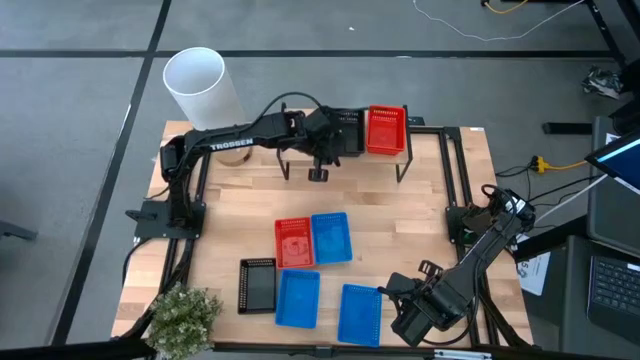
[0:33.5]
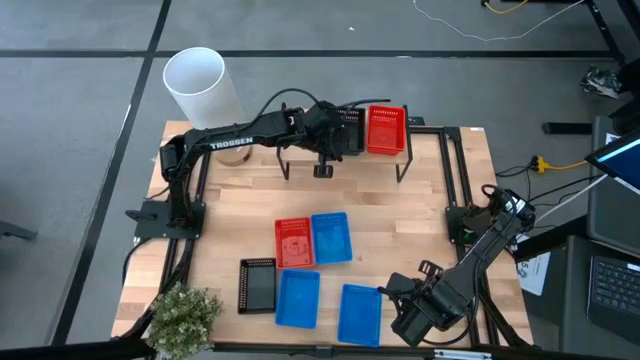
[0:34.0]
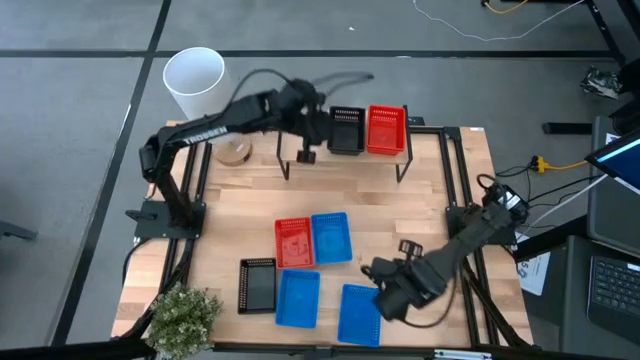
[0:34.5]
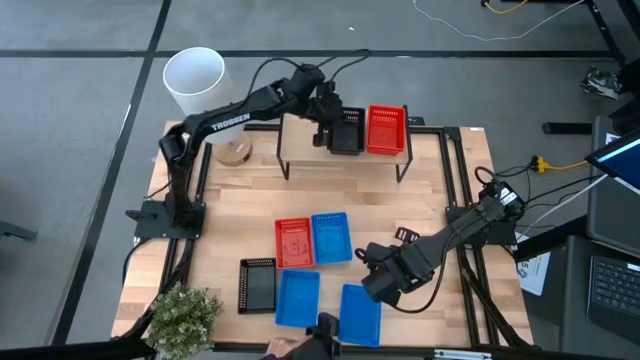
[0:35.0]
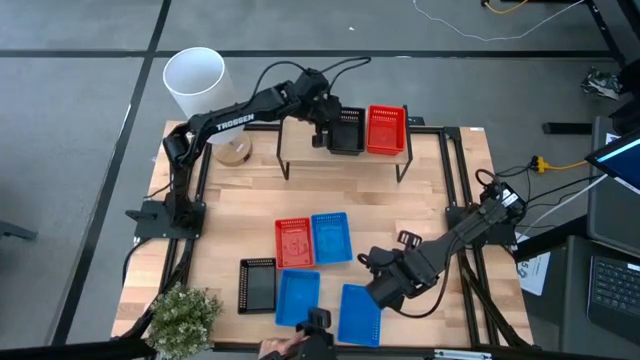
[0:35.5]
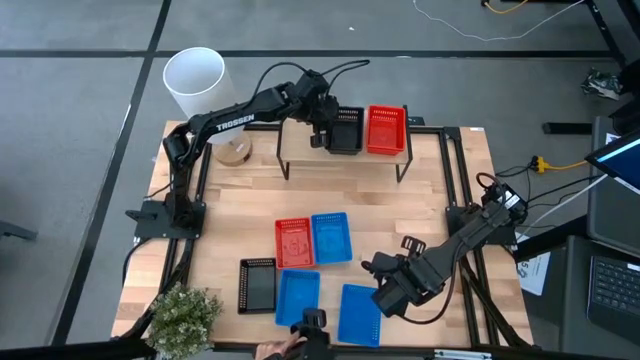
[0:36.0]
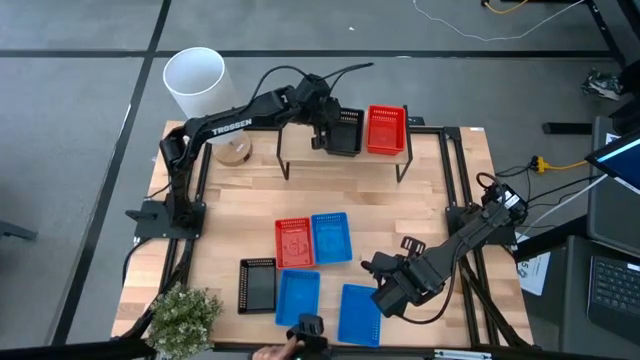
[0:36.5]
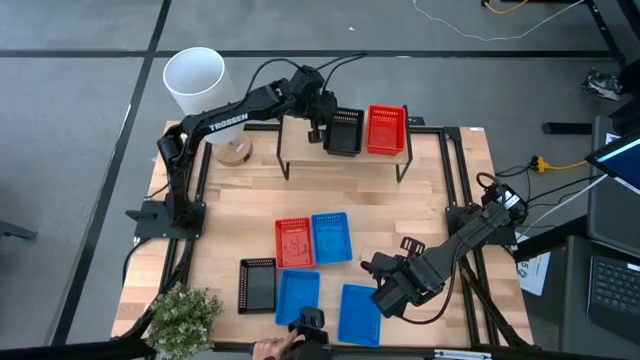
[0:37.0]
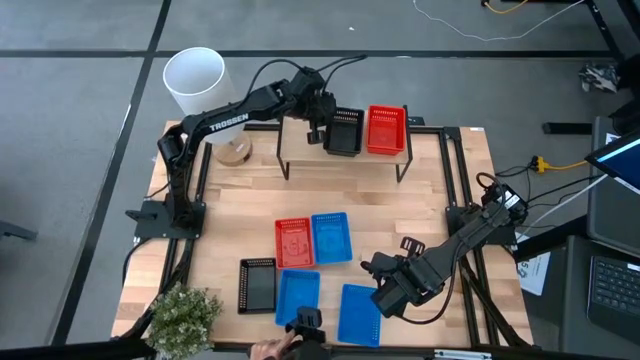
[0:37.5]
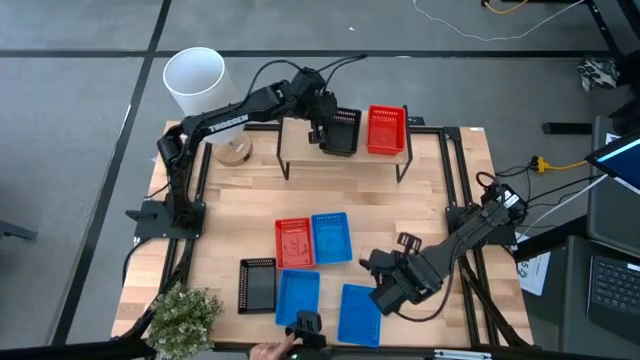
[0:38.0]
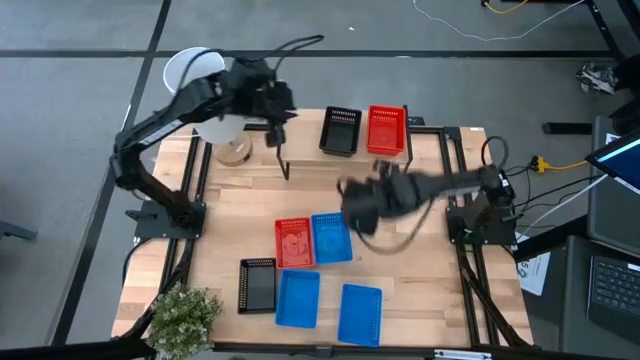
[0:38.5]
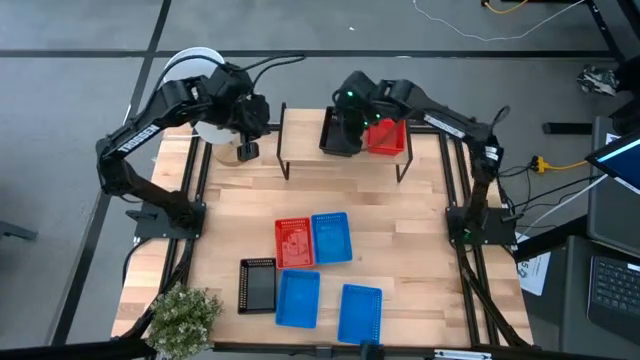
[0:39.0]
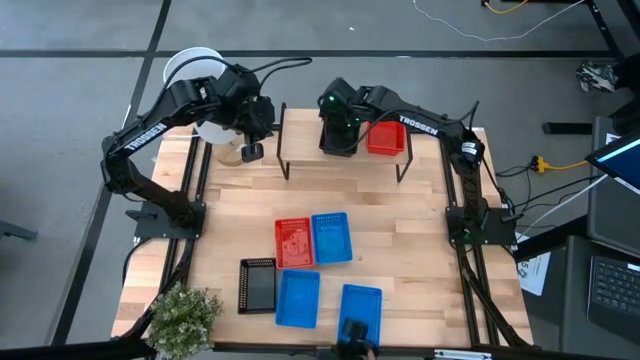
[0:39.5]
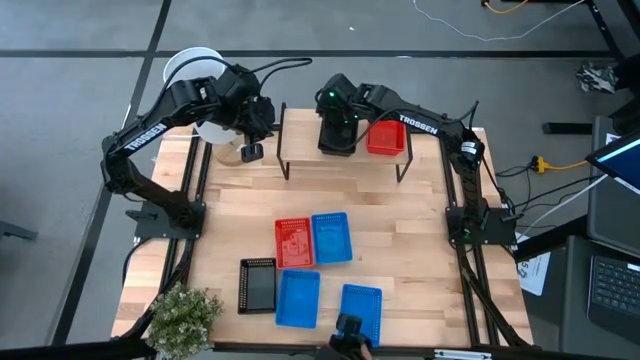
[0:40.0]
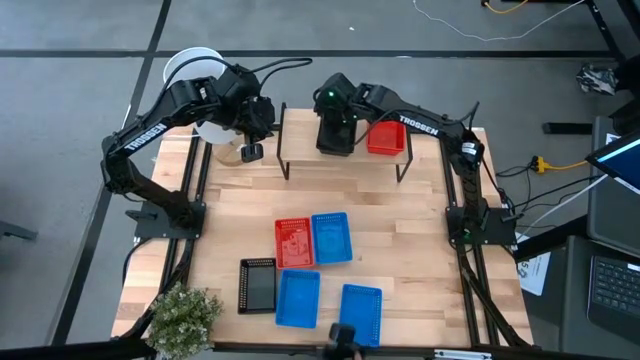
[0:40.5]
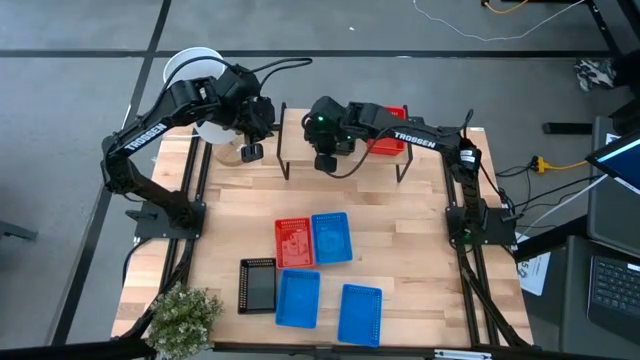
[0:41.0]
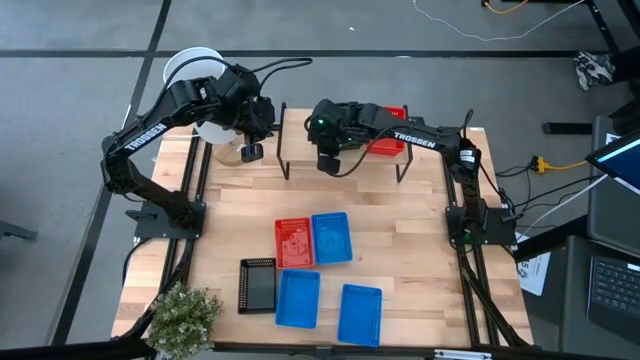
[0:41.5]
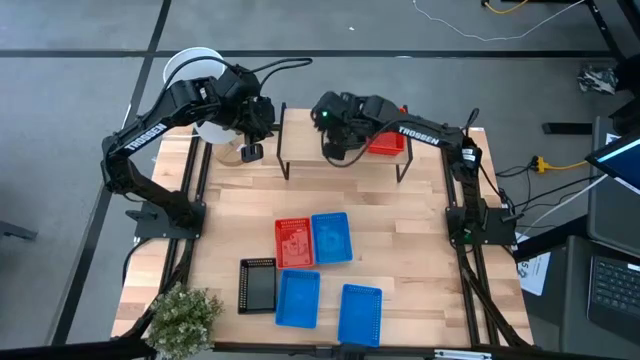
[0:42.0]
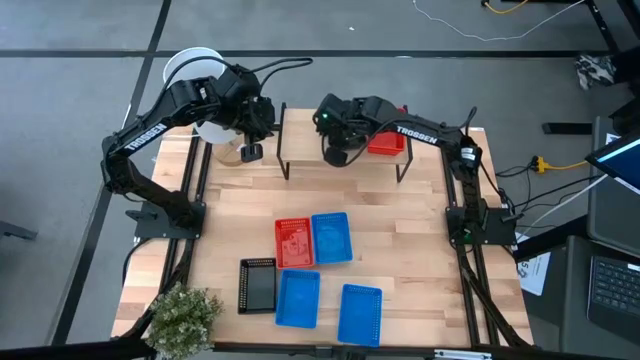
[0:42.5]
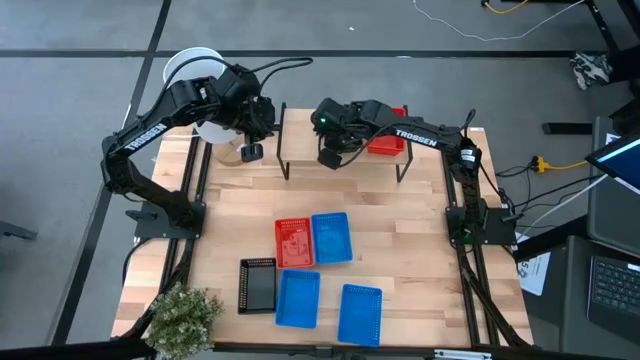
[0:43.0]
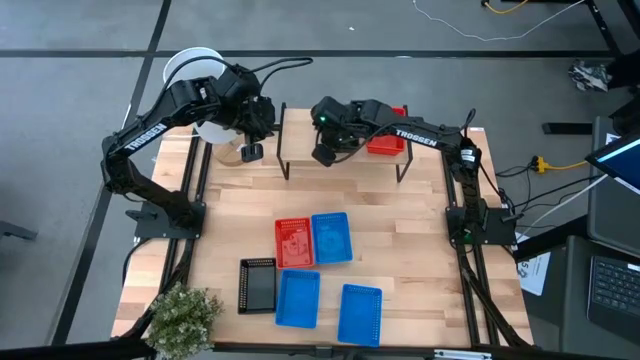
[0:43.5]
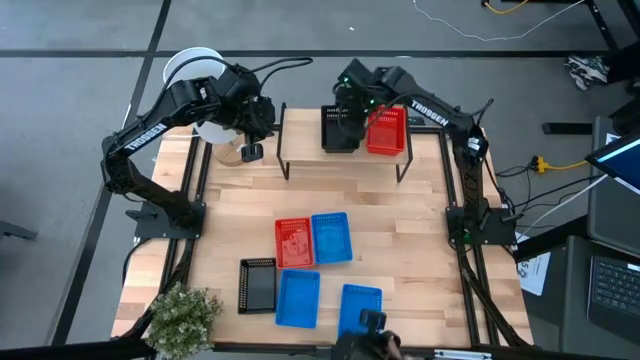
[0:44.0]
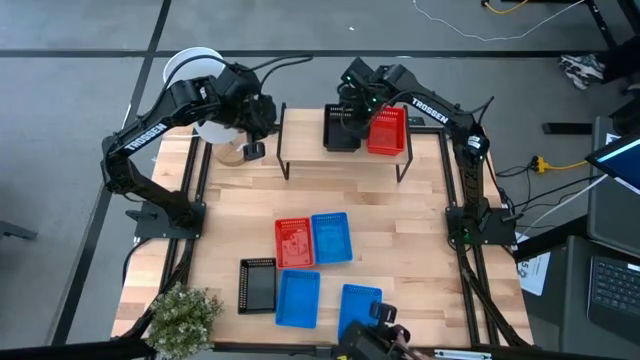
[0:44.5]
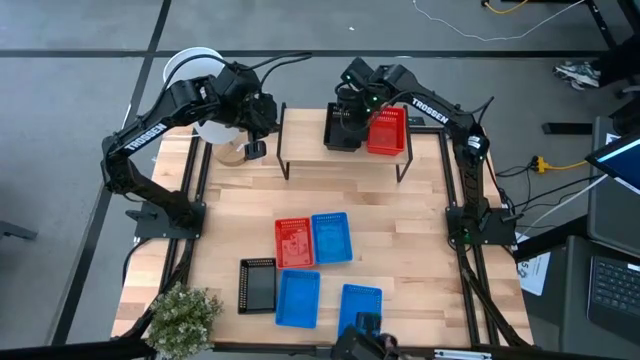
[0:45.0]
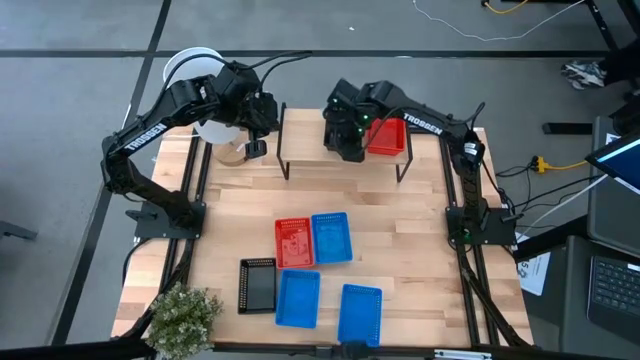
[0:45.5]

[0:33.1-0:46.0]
Task: Stack baskets on shelf by color
Stack the top black bin on top of the other black bin on the shelf

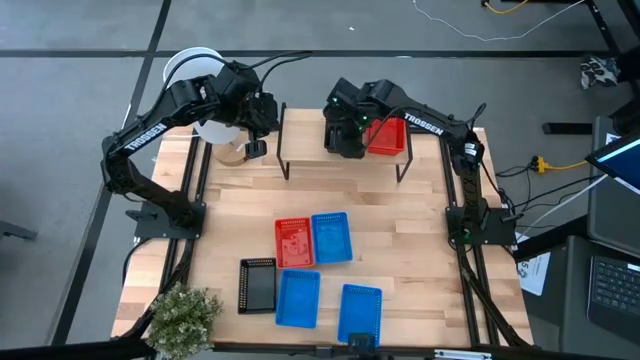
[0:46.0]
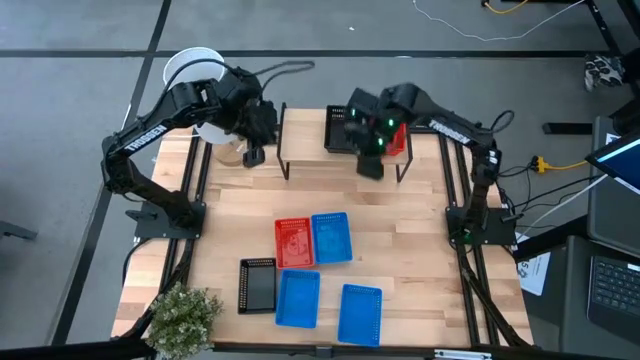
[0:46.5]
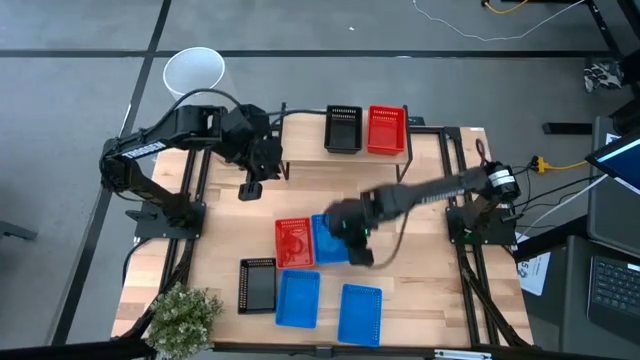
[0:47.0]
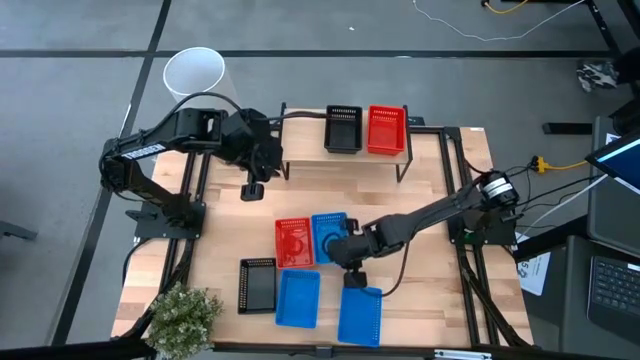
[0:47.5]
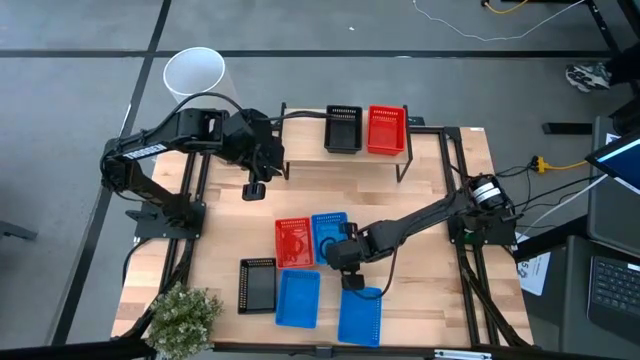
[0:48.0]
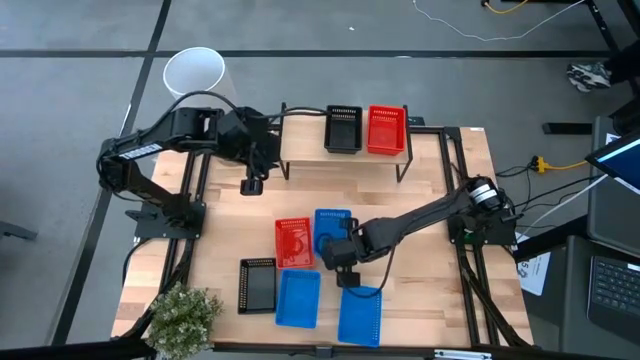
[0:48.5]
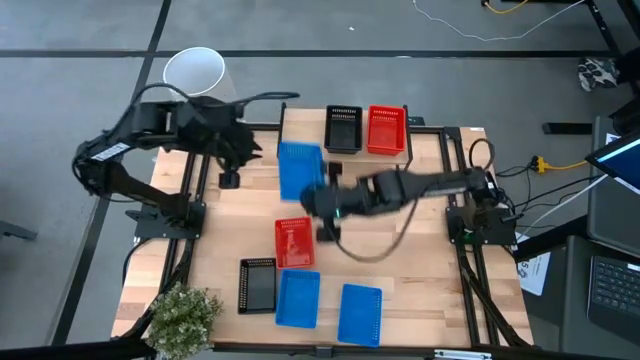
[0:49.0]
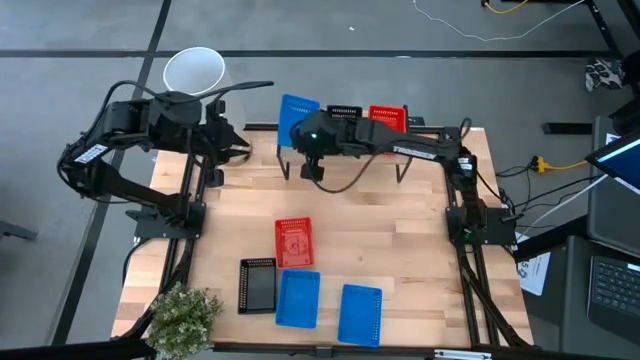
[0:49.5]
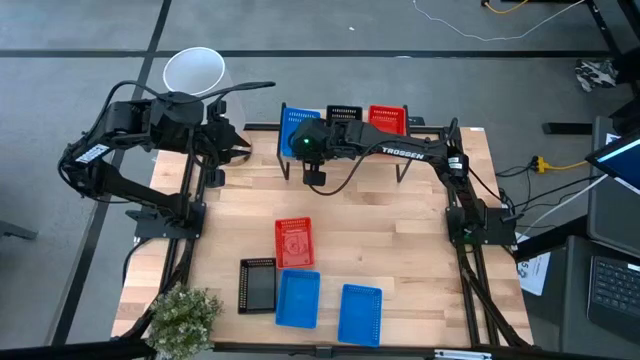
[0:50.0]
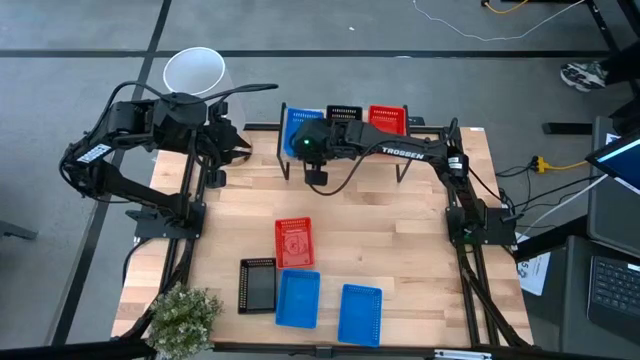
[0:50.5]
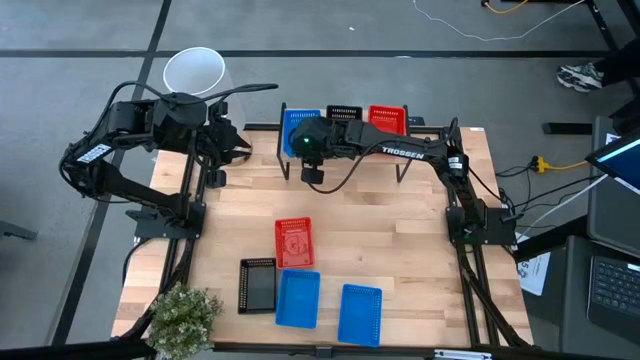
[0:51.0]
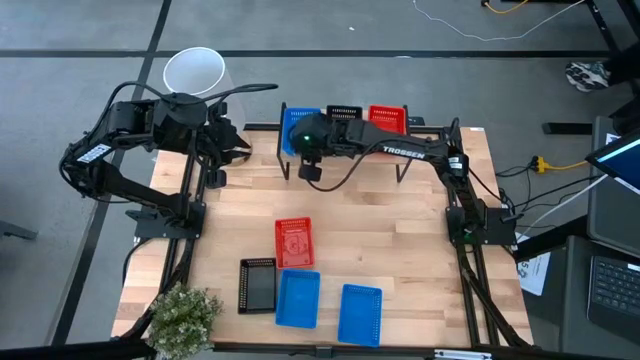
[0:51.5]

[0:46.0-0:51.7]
Put the top blue bin on the shelf

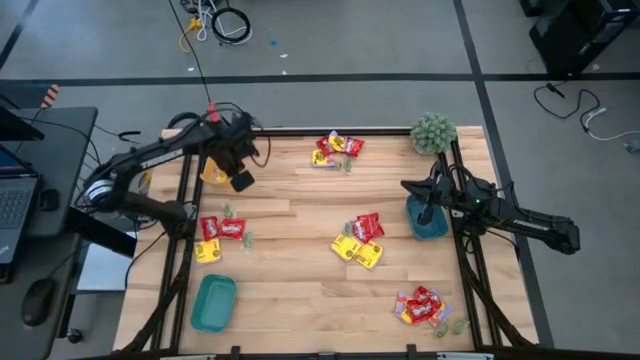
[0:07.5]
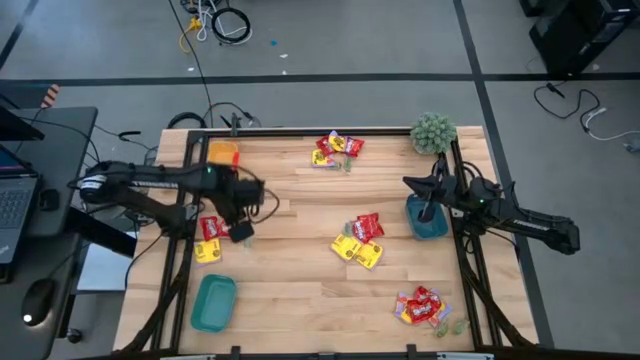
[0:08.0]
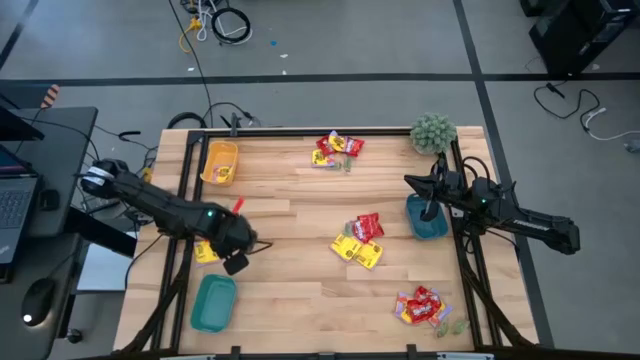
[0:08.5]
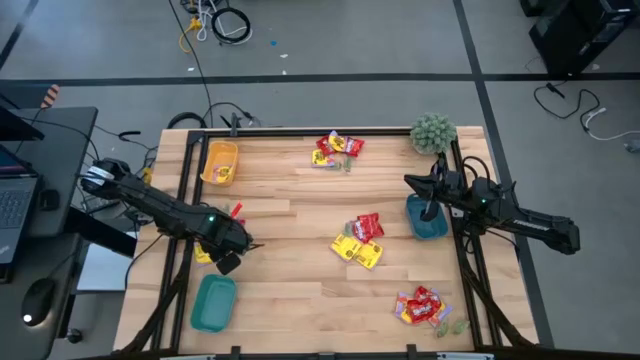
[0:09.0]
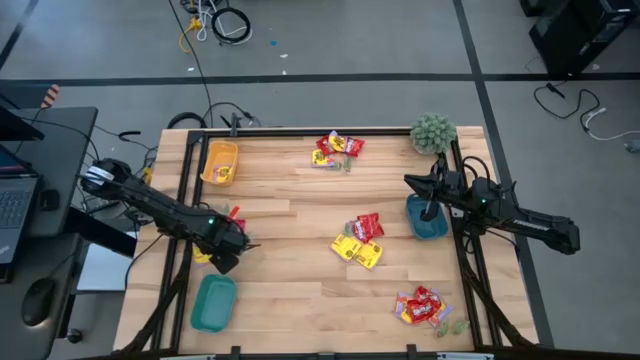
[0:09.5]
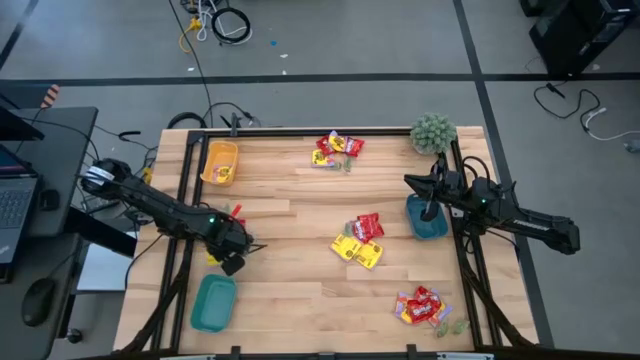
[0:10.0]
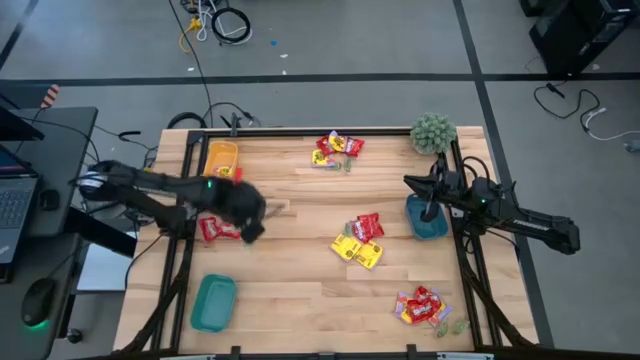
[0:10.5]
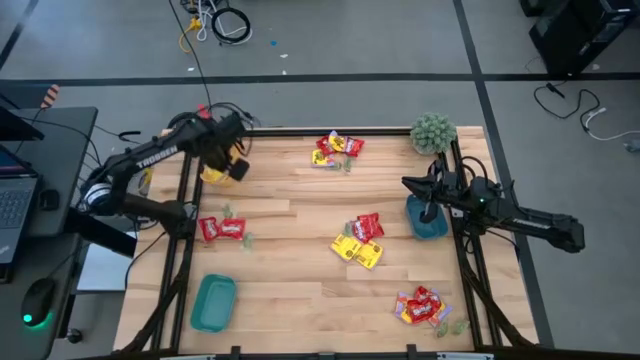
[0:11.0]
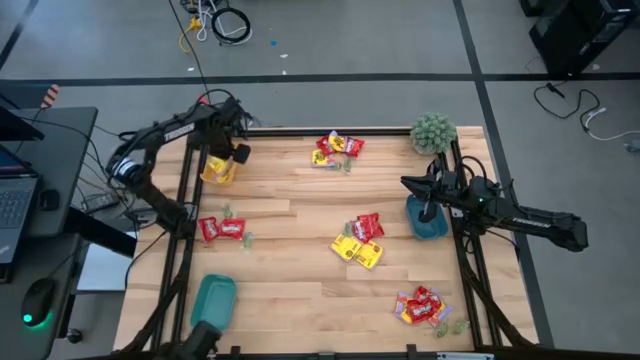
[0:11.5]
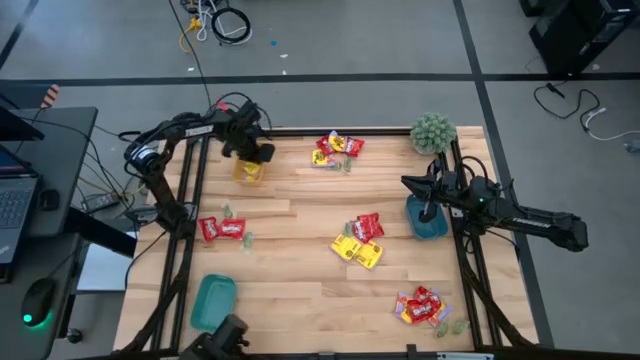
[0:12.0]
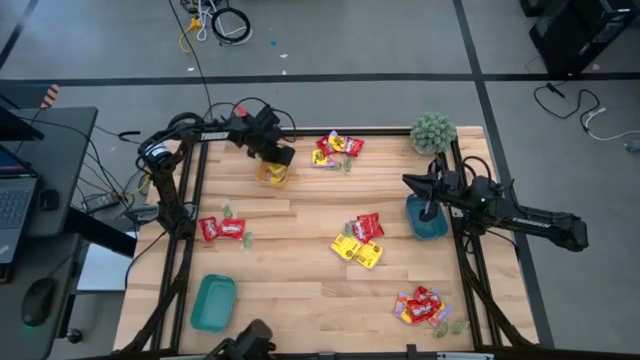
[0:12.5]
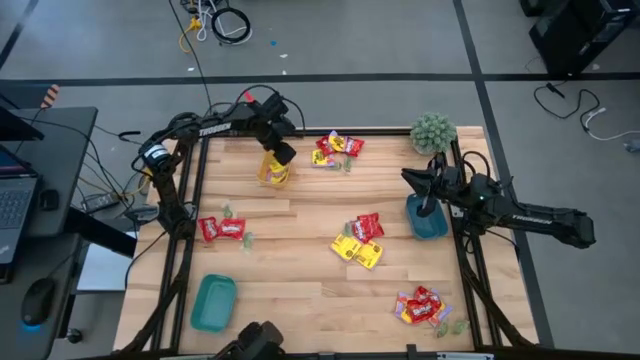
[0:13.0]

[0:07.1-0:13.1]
Task: Sort candy
Put the yellow packet of candy into the yellow bin
